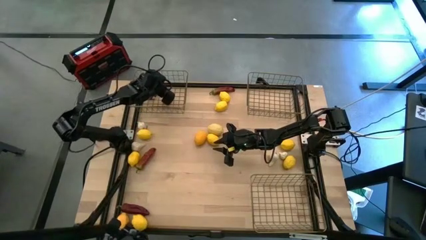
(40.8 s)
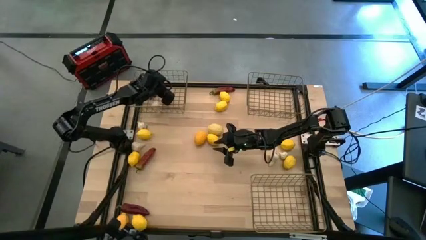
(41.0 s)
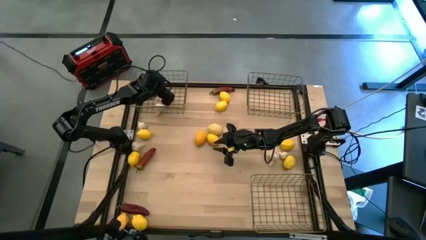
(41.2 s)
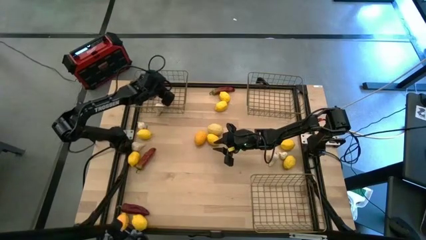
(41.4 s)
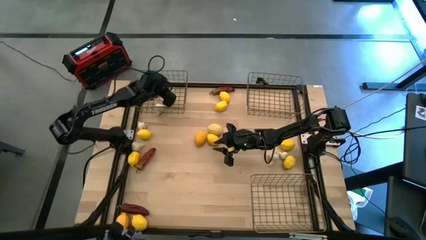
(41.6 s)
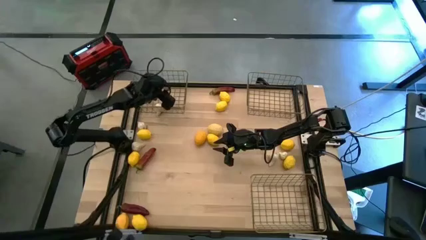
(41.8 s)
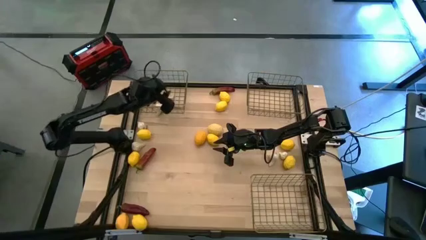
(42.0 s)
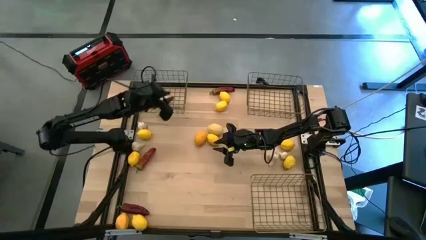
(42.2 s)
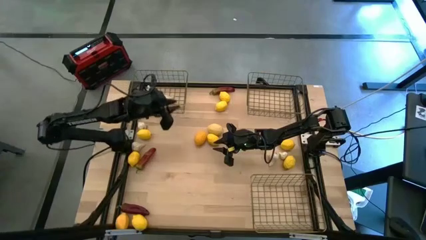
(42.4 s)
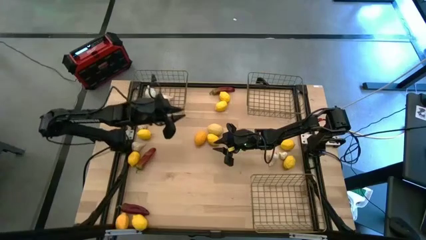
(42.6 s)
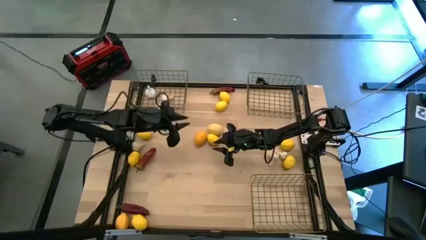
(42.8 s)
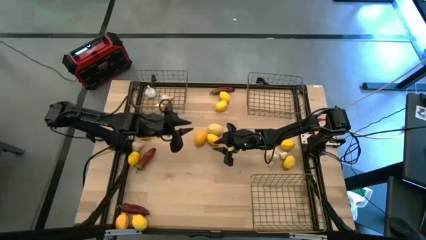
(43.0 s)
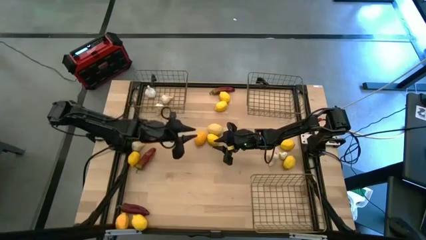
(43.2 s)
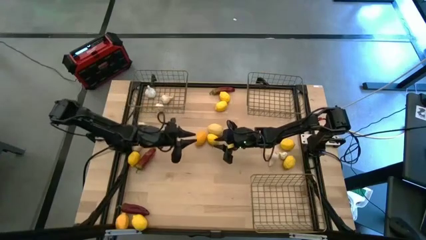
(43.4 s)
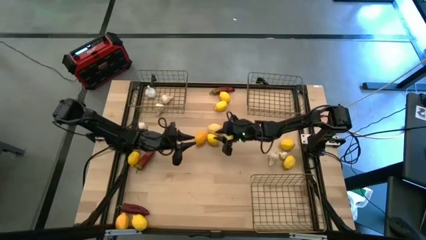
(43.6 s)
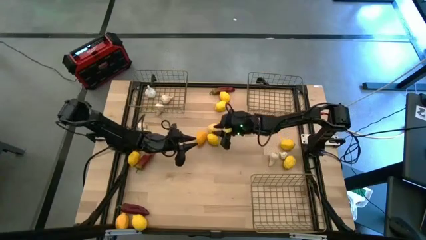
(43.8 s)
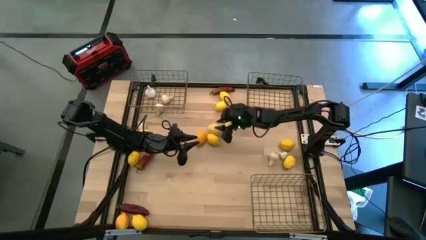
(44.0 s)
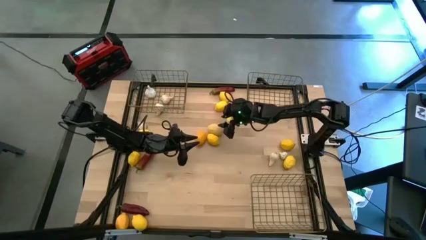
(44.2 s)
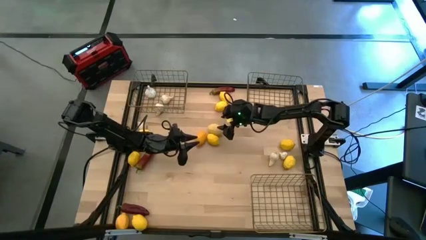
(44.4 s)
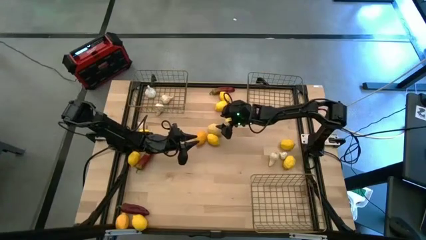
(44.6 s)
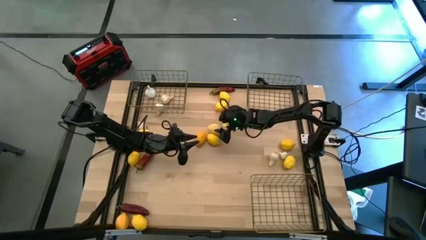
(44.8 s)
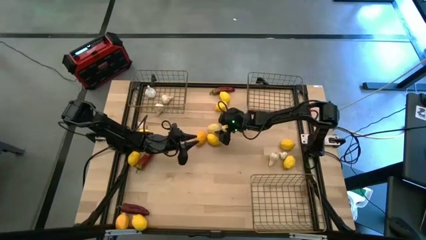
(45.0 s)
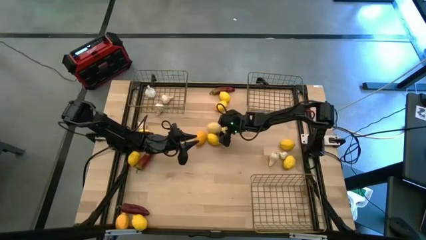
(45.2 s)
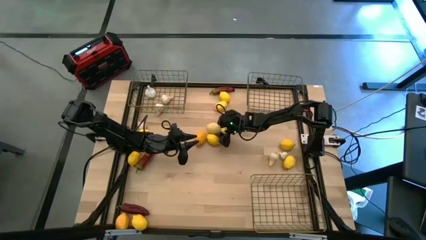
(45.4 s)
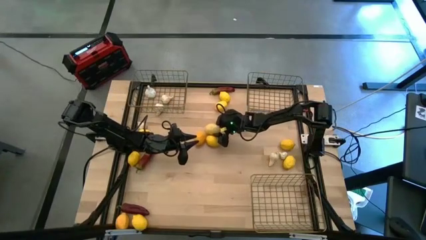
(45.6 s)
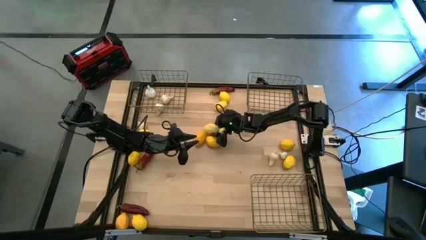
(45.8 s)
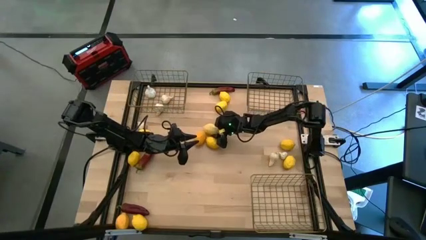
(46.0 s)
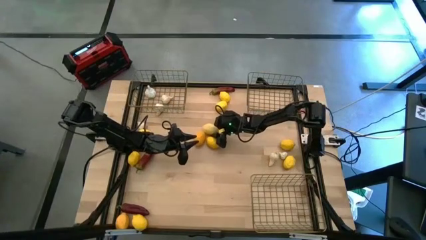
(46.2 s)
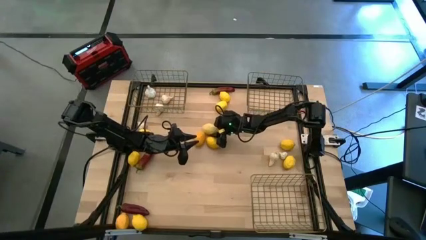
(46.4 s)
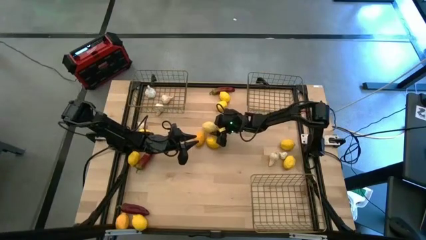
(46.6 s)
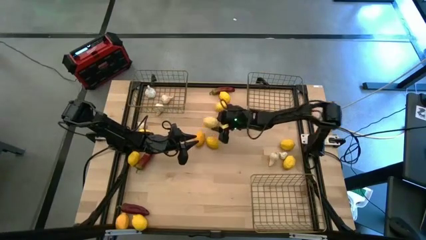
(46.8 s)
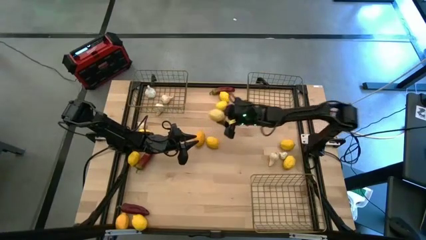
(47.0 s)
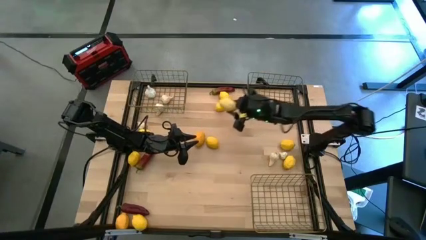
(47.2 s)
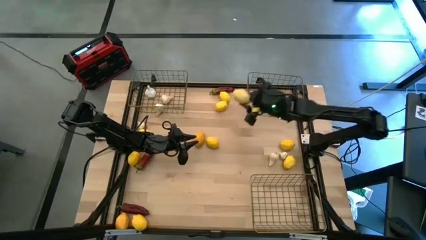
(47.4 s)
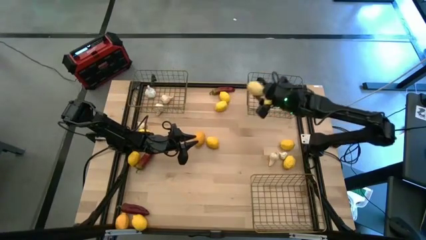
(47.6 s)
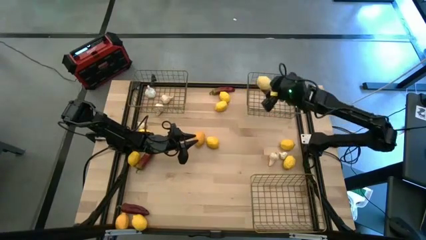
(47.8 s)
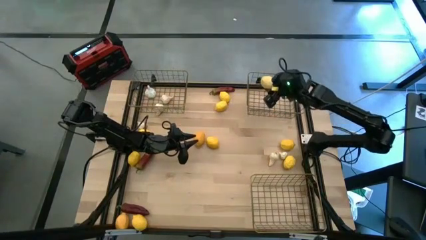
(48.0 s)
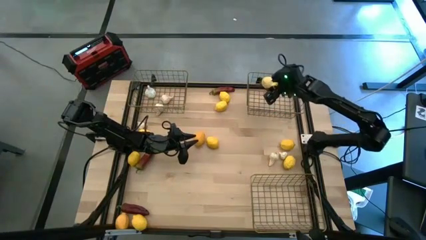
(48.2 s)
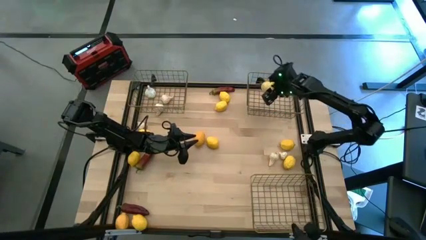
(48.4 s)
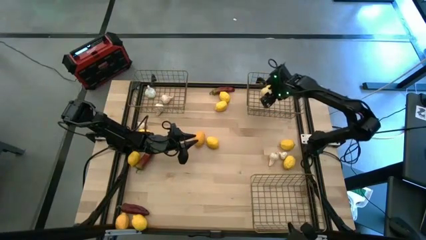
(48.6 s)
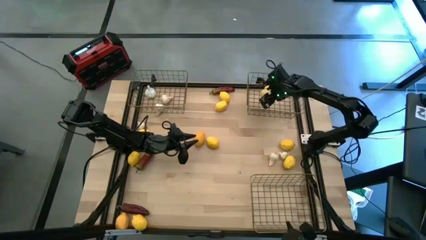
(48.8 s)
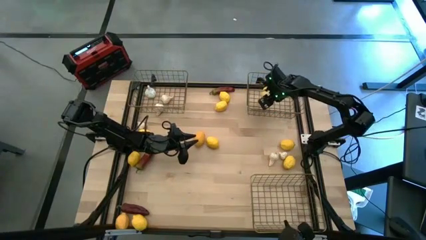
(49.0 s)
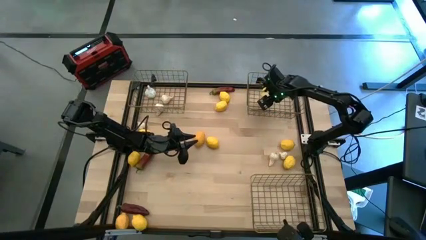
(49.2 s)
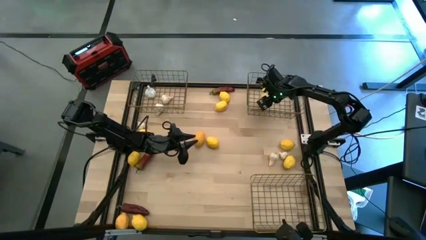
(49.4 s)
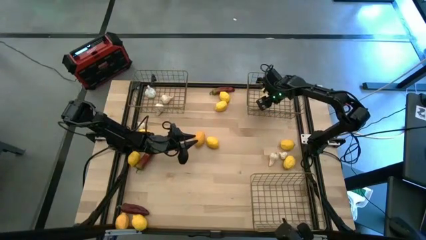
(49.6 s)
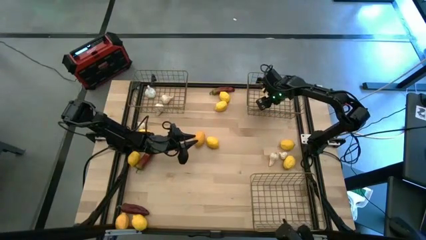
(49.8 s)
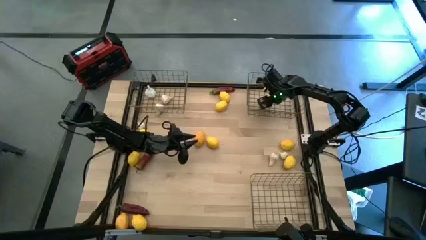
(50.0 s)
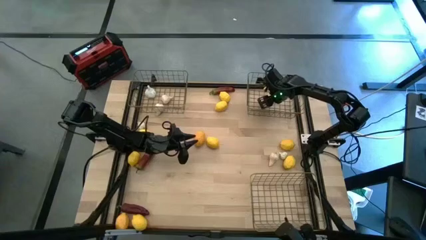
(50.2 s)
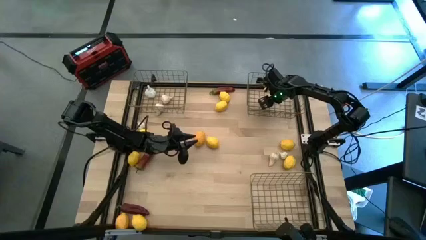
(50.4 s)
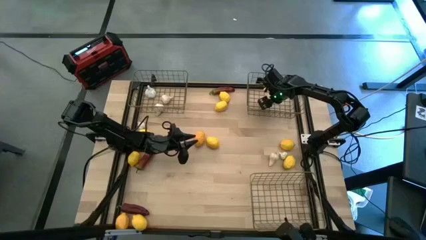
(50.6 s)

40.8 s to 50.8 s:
Task: Sort produce into baskets
Put the yellow lemon into the top right wire basket

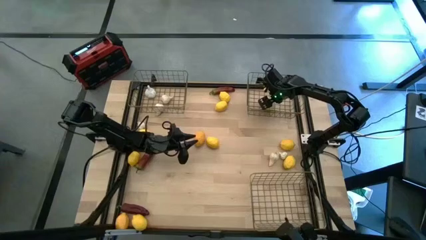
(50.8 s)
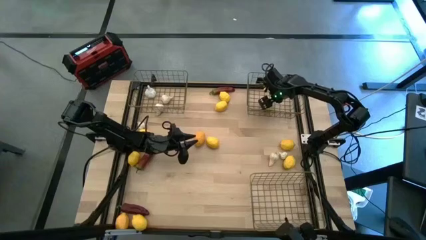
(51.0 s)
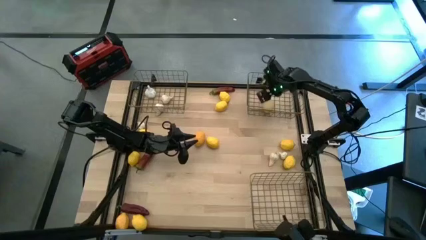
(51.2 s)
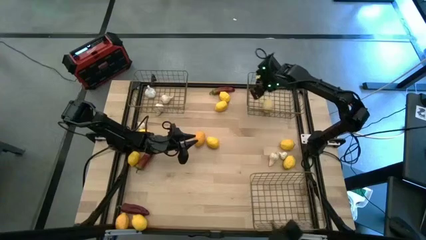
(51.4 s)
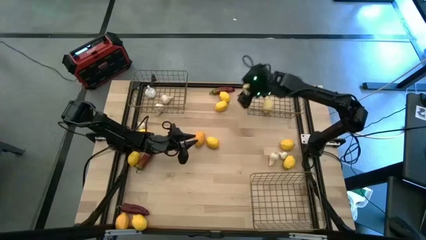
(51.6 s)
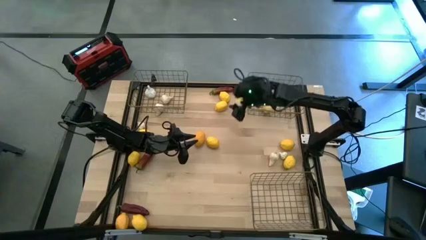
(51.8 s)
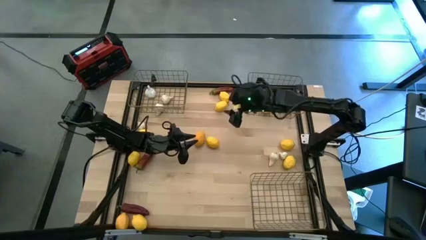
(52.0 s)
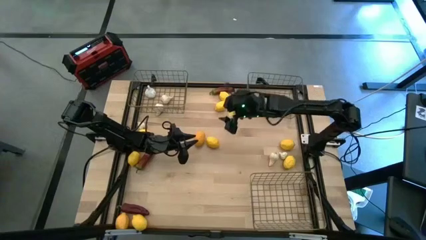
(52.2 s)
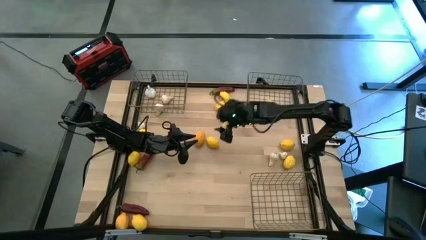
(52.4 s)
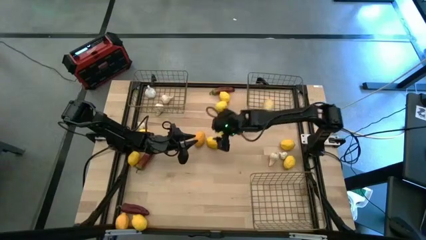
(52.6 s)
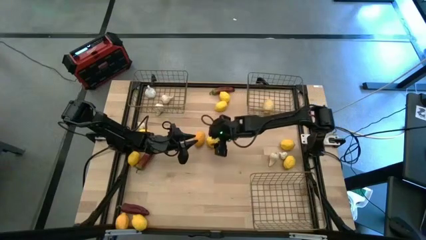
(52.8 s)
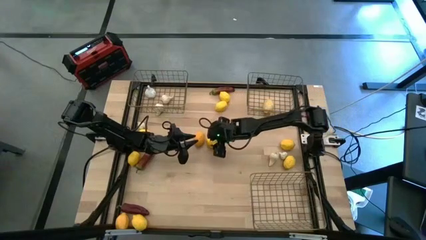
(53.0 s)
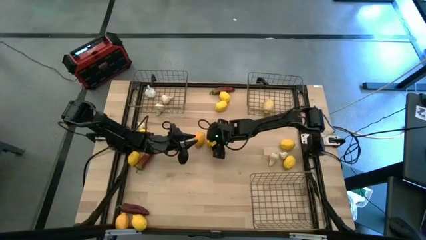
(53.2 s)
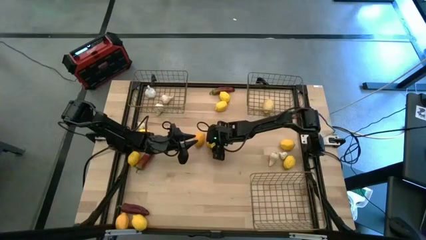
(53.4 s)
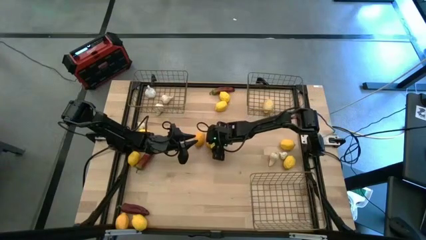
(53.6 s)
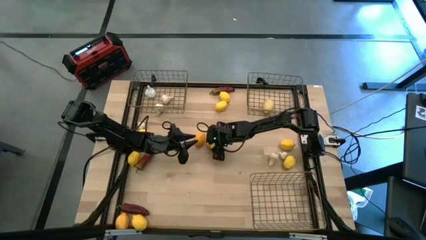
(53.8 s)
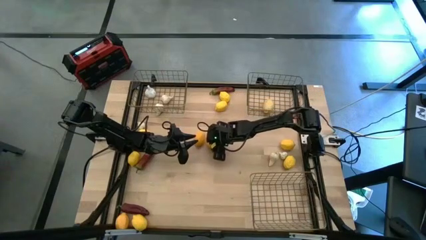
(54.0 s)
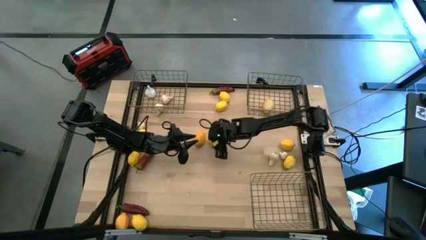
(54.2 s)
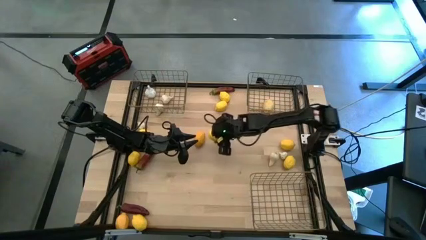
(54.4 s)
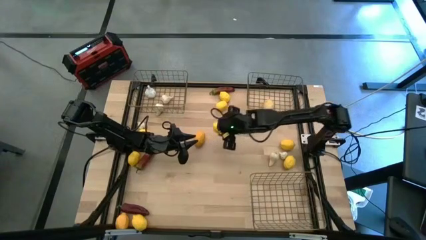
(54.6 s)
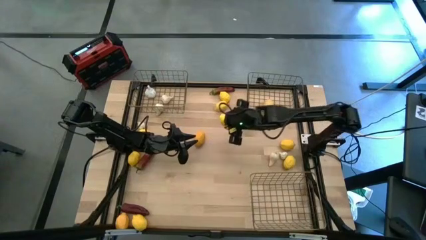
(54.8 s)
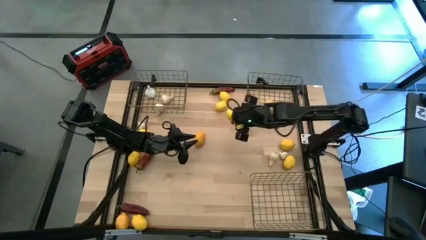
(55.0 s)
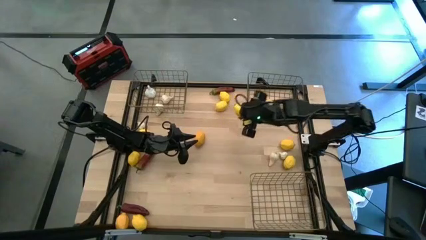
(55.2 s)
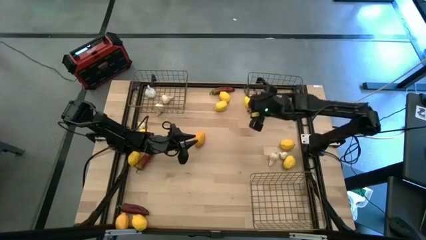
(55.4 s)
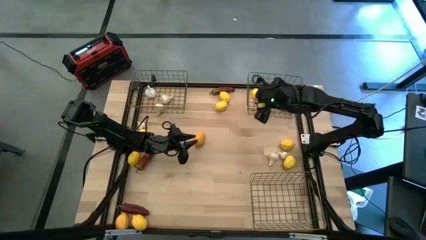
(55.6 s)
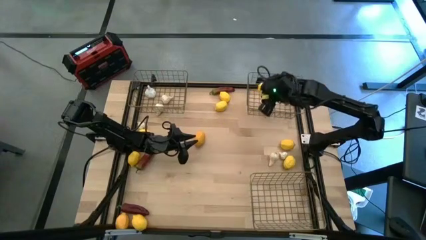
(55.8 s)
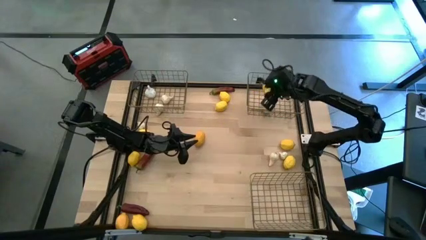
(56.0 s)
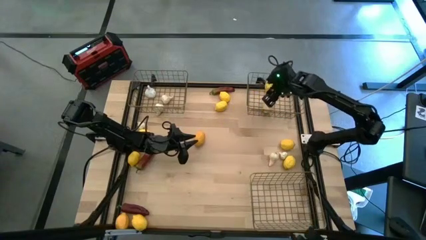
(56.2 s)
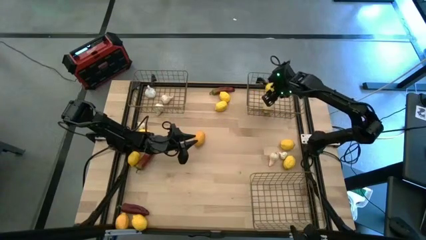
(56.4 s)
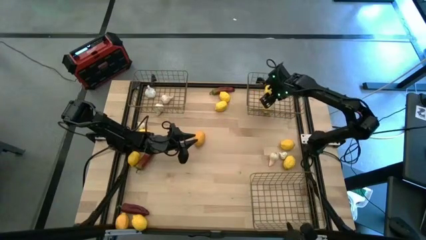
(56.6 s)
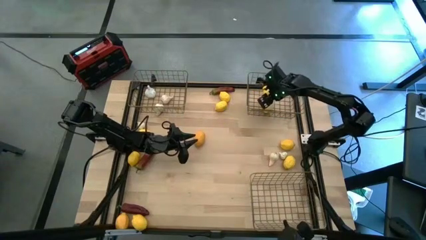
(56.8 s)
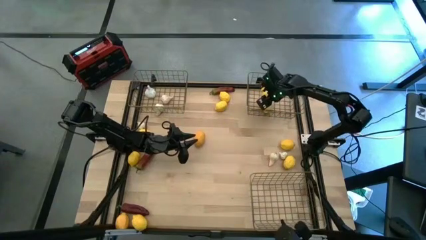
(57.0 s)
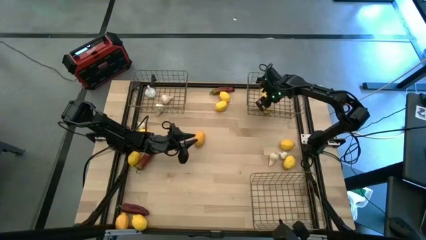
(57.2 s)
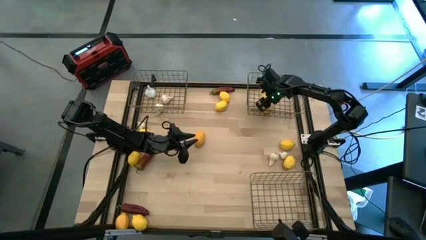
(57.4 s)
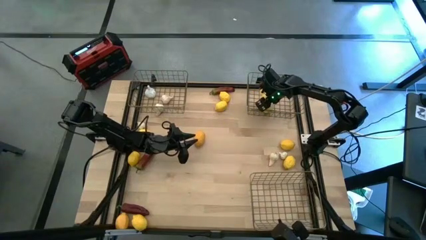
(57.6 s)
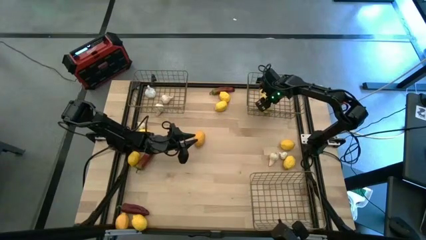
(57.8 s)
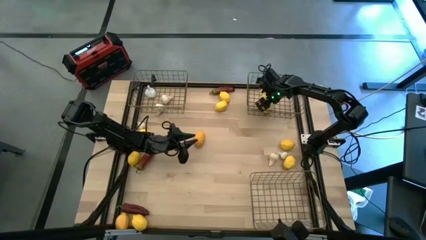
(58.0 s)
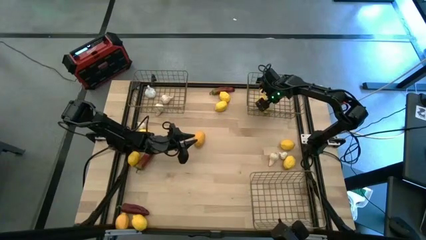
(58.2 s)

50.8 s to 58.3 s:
Put the yellow lemon into the top right wire basket
